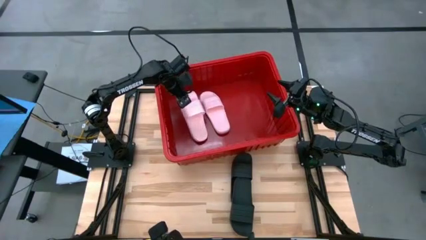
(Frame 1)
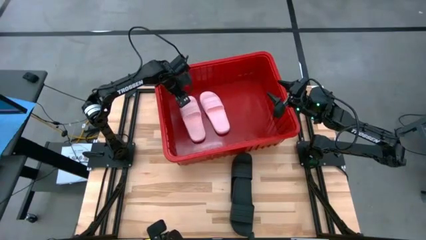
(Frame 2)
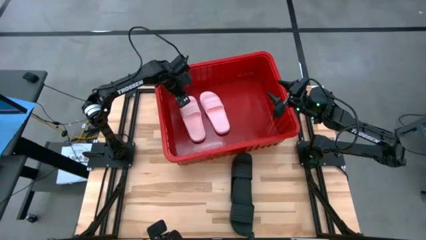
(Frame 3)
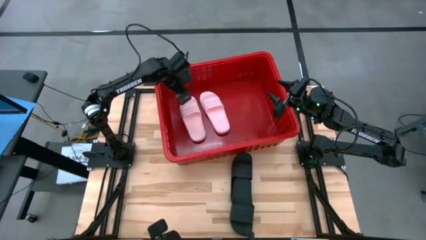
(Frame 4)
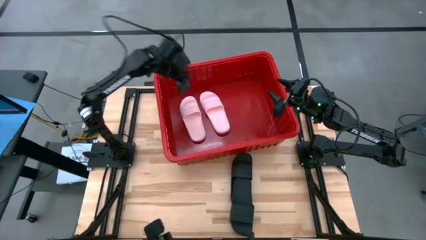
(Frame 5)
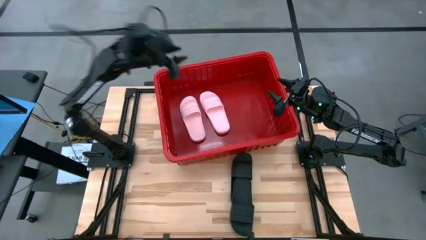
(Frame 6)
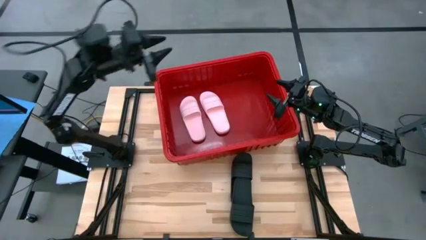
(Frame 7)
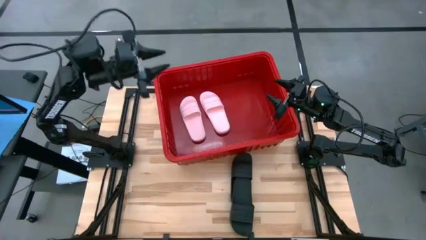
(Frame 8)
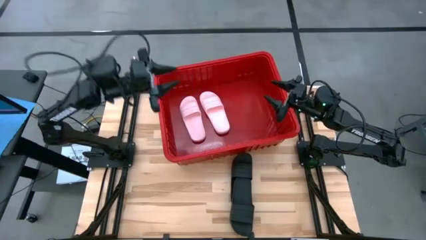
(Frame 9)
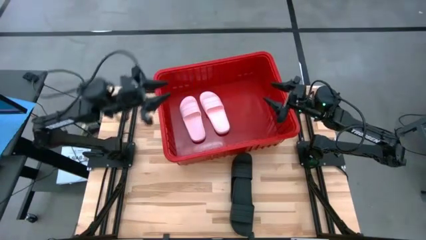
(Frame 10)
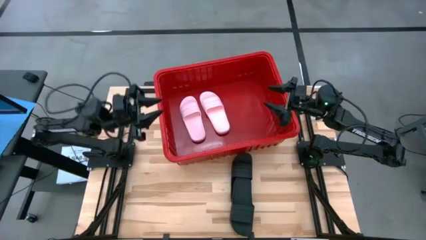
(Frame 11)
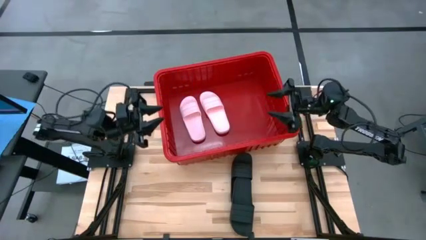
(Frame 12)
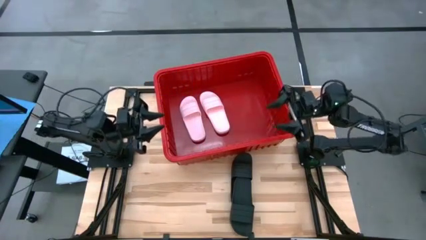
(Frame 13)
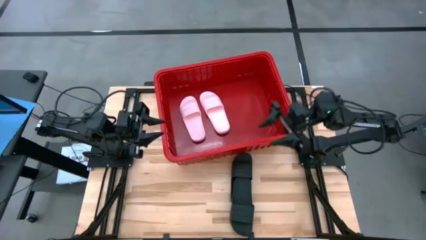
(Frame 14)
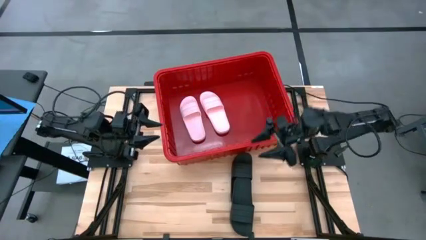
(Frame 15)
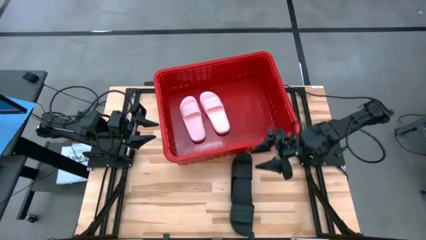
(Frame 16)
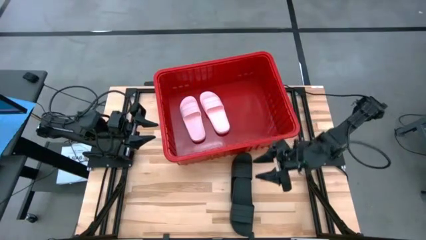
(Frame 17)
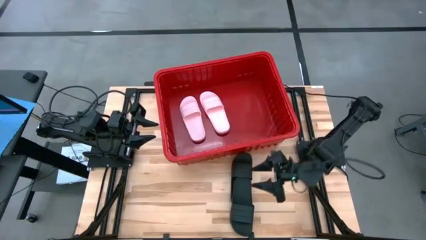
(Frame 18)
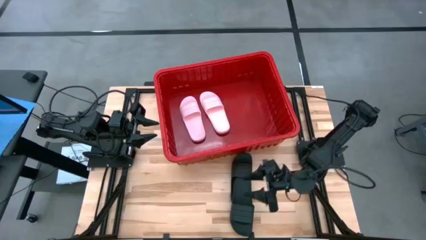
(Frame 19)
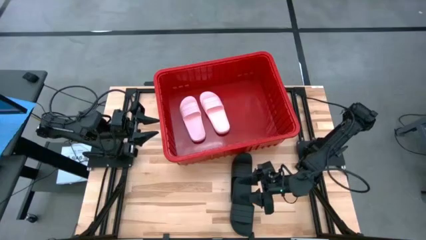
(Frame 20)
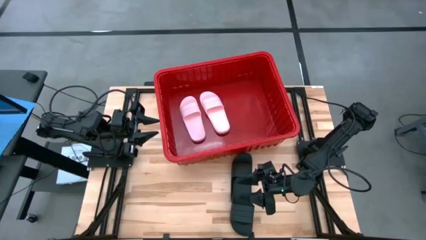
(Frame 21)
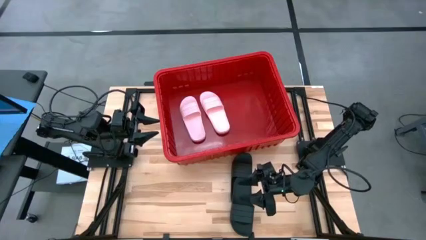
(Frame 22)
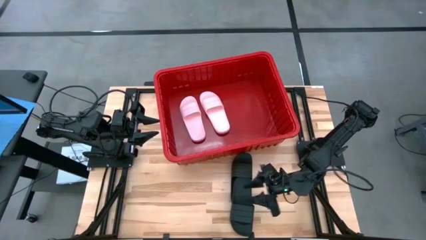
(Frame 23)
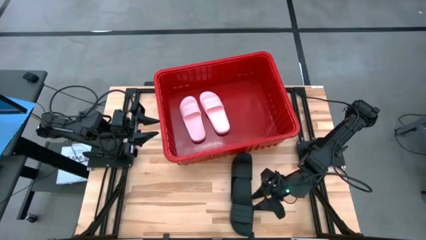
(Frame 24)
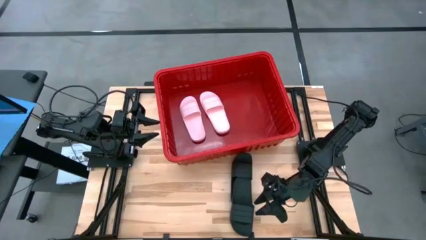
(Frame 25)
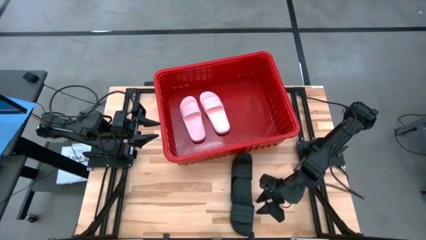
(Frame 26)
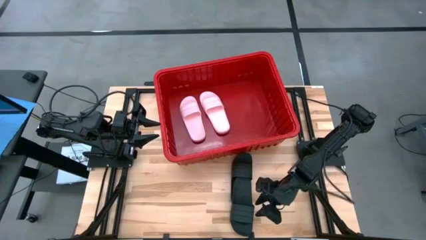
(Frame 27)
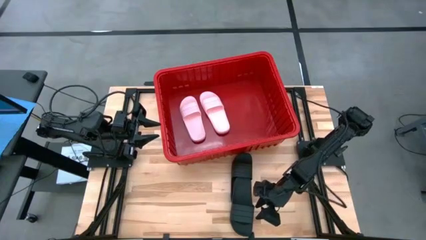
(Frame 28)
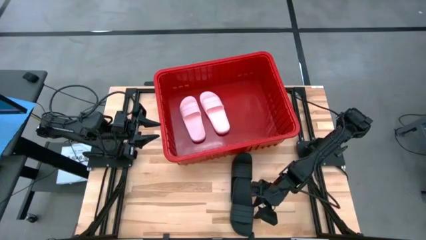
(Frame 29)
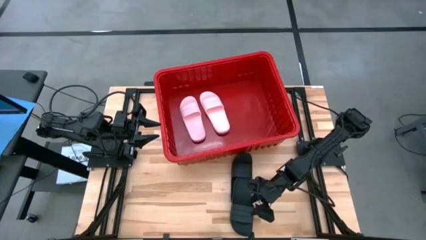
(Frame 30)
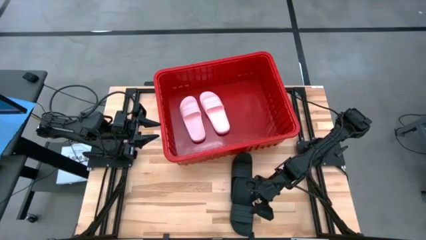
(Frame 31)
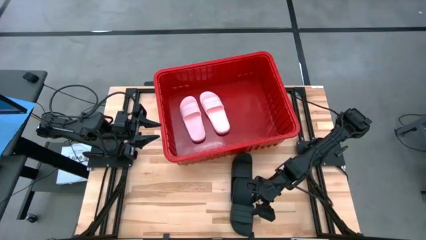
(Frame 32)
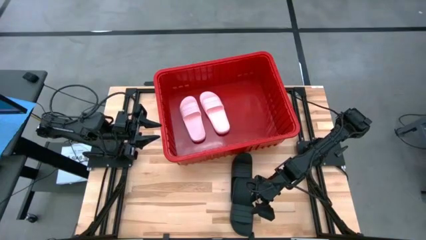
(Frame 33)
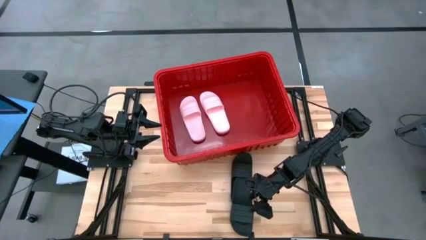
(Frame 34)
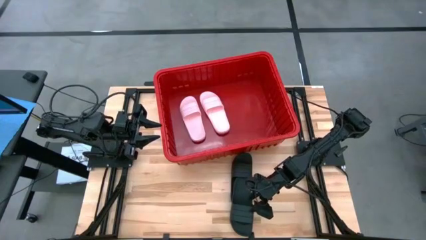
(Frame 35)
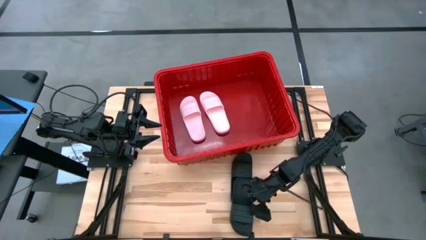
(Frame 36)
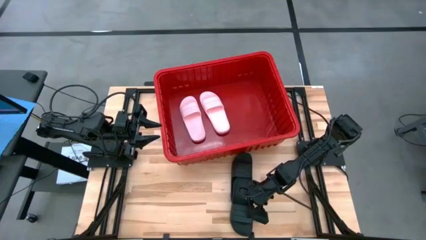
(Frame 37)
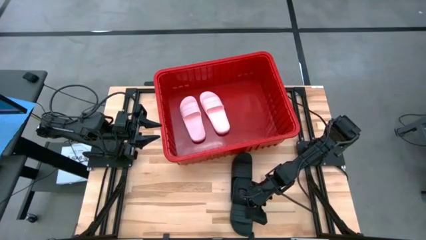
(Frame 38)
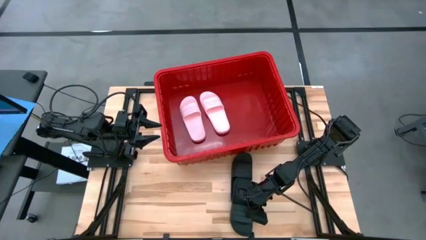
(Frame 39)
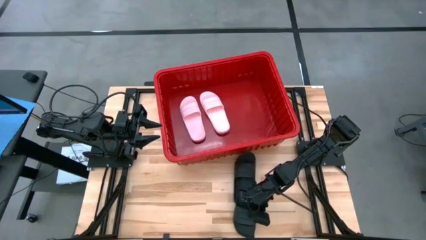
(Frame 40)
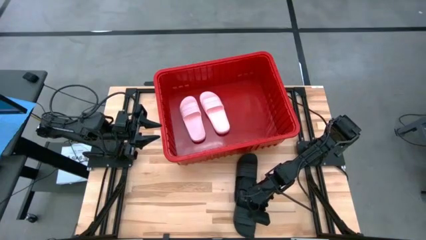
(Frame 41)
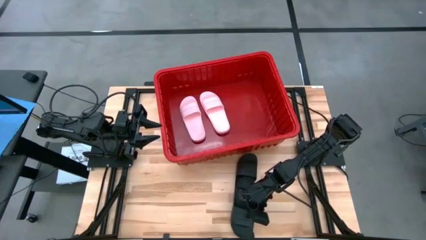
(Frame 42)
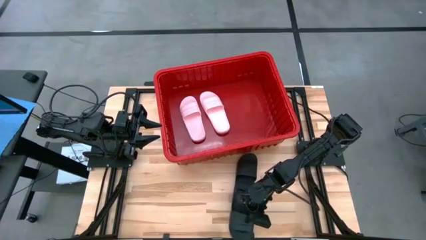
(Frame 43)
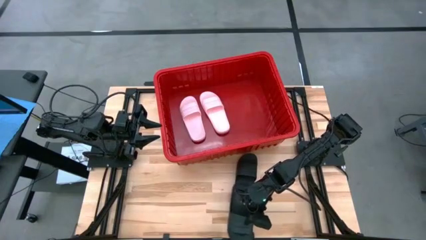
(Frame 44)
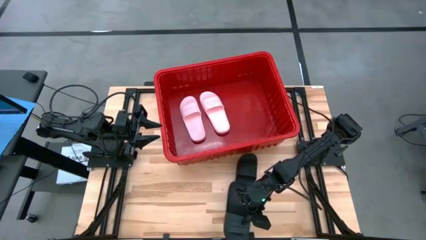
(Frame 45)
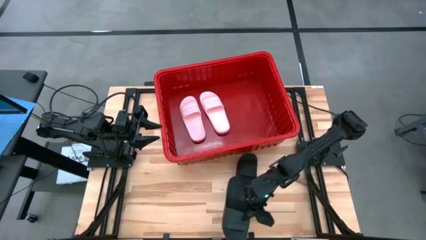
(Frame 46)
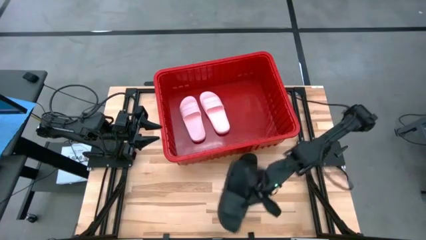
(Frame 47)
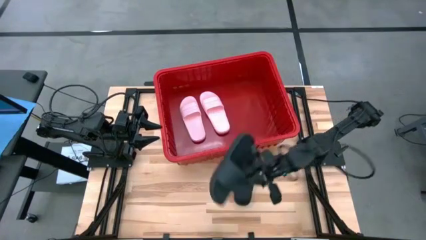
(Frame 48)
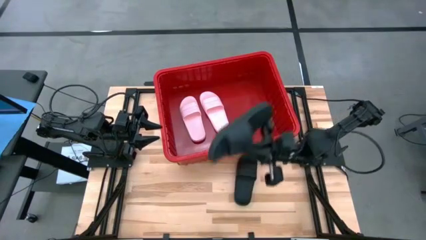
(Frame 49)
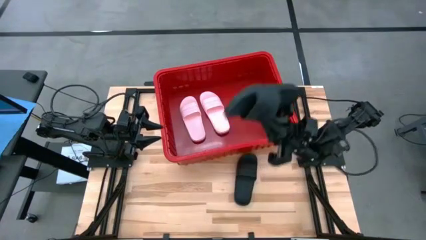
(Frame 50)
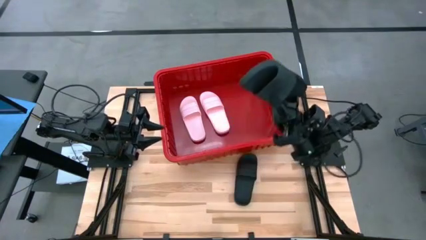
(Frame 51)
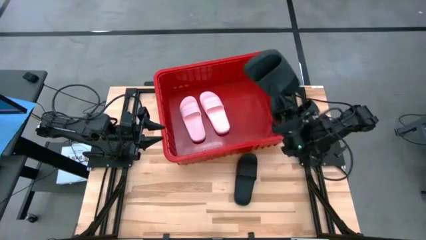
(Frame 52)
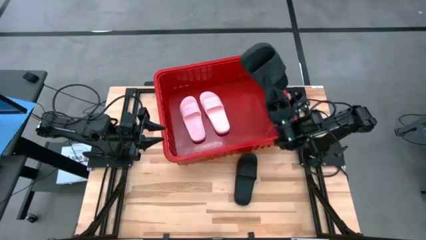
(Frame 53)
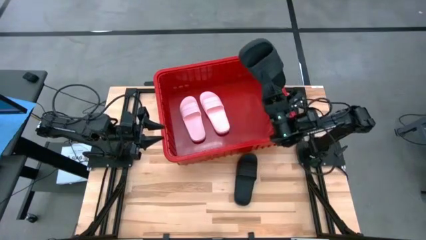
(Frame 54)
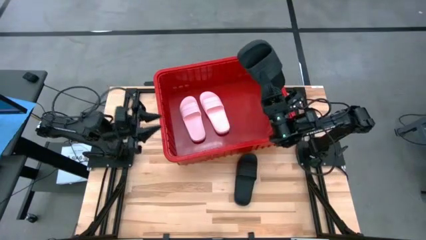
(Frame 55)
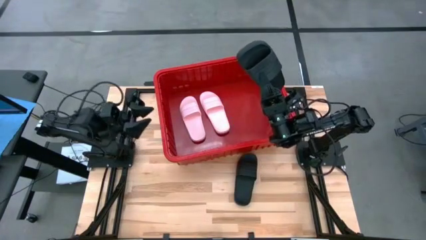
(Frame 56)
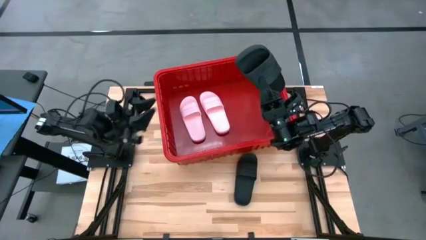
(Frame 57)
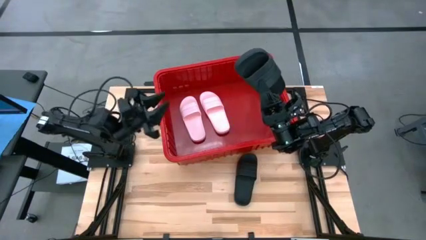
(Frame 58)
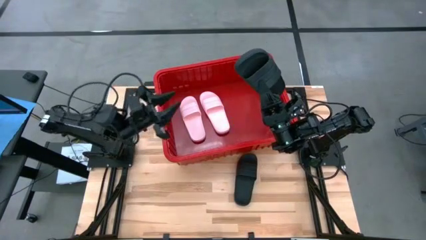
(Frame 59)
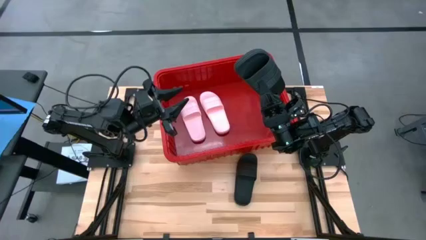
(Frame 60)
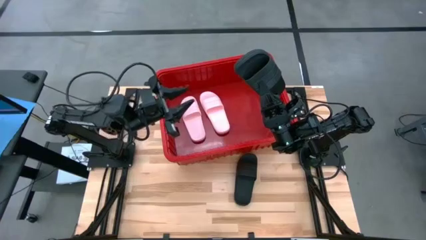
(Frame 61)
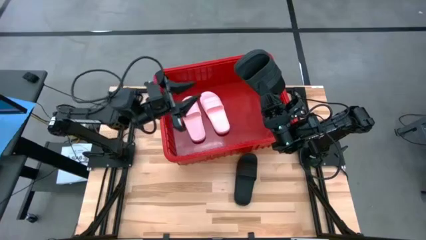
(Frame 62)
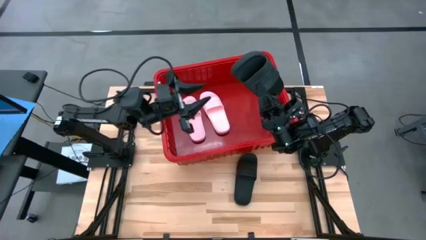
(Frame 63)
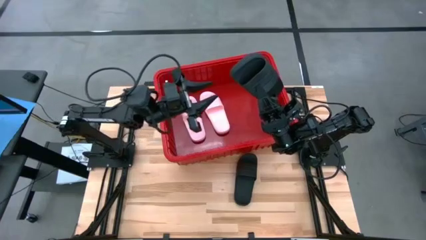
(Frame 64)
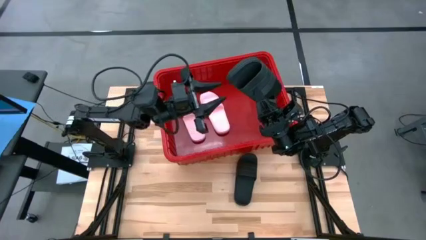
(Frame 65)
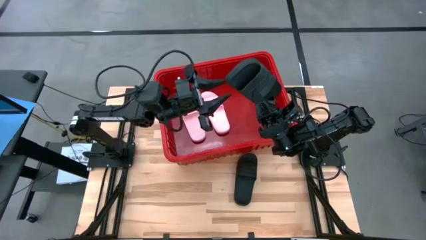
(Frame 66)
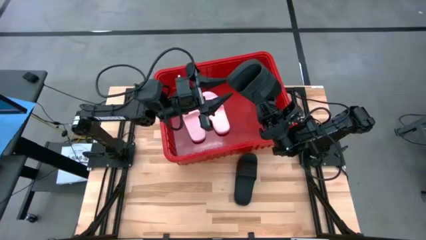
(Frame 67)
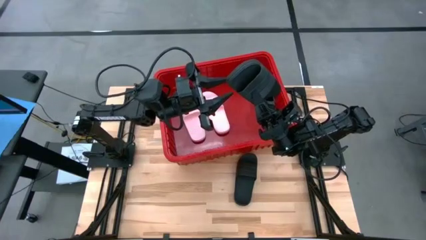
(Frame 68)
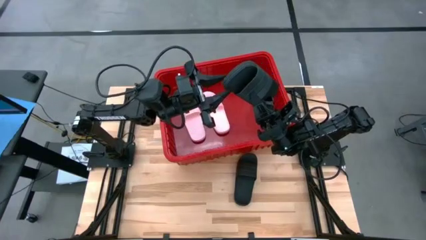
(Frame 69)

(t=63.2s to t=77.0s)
Task: Pick and place slides into bin
Put the bottom black slipper in the red bin

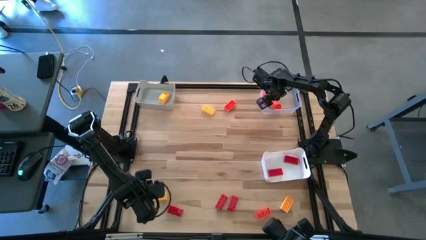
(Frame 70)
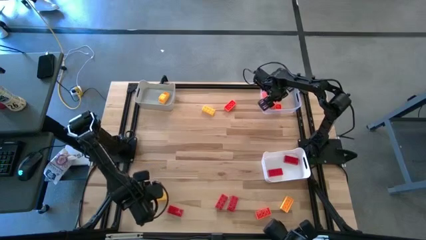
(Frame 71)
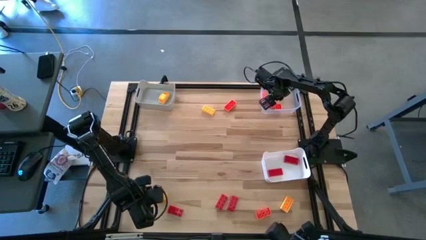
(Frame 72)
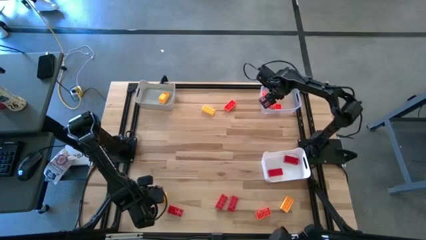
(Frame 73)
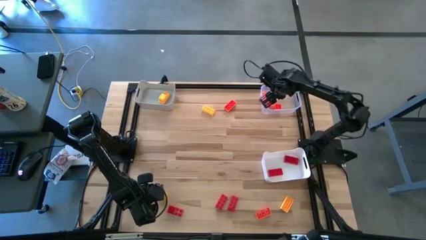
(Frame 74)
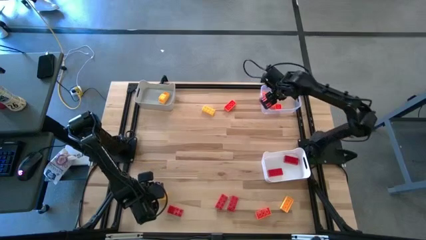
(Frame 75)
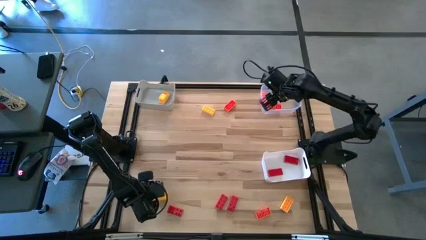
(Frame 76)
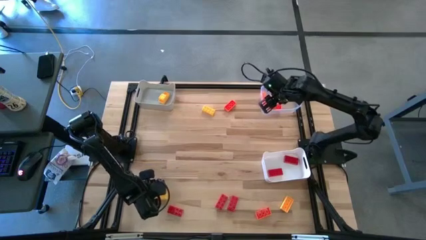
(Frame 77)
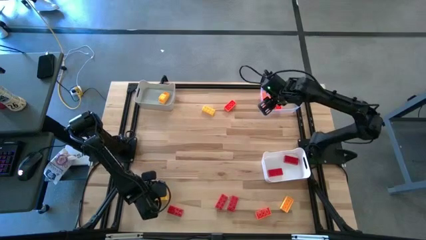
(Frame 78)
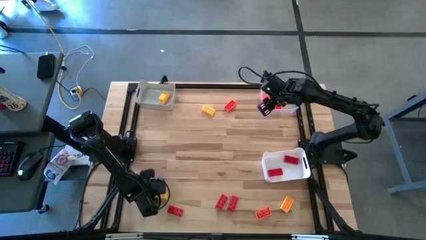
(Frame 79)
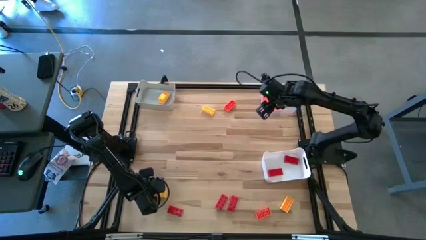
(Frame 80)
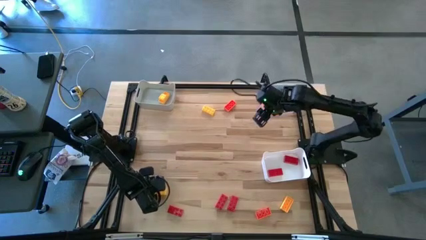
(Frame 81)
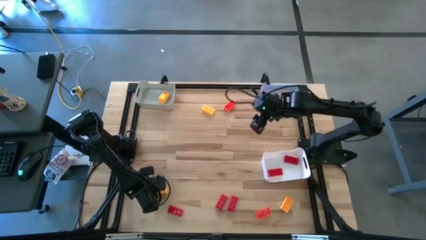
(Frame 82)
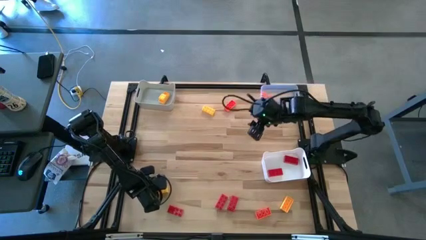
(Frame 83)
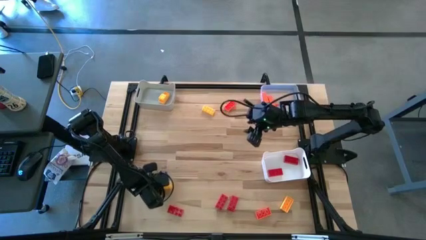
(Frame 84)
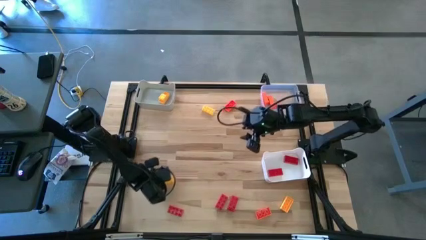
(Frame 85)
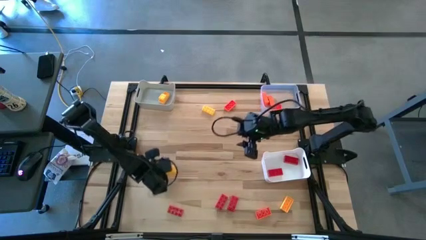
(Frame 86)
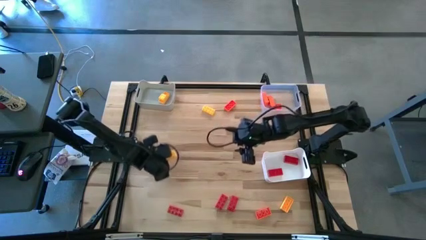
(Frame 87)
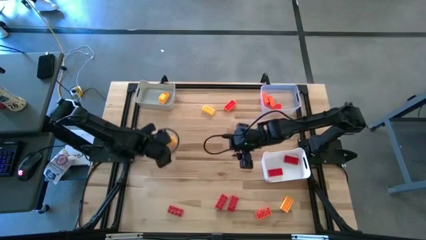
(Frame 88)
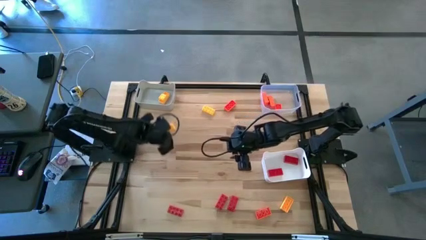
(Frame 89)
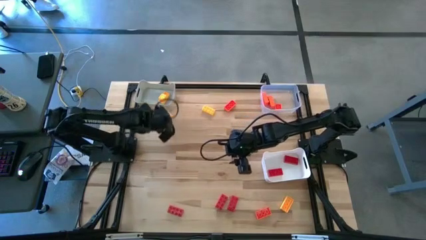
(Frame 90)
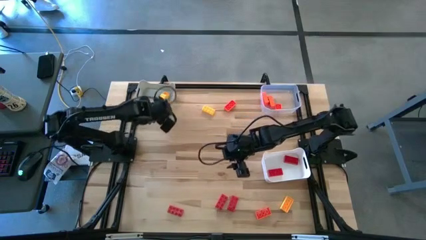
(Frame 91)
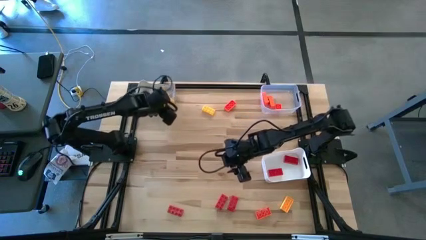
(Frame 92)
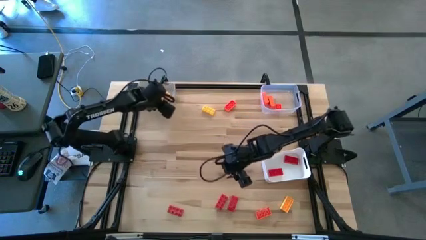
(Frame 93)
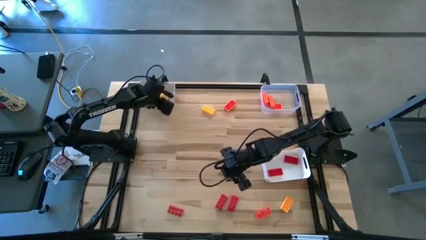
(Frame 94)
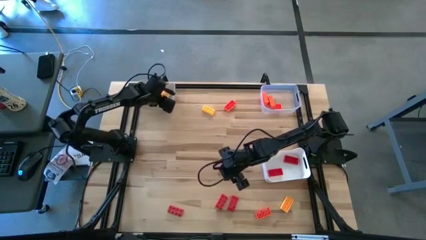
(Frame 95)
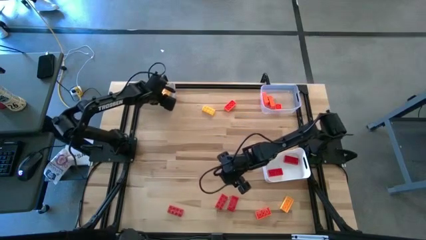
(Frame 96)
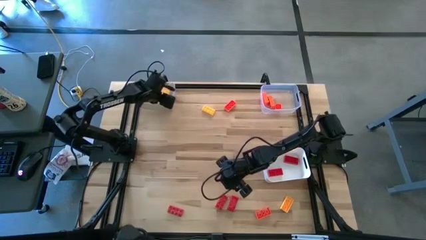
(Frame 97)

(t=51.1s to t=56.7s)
Task: Sort & place blocks by color
Put the yellow block into the gray bin
